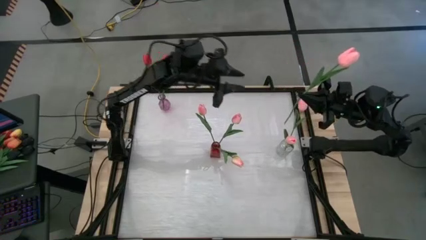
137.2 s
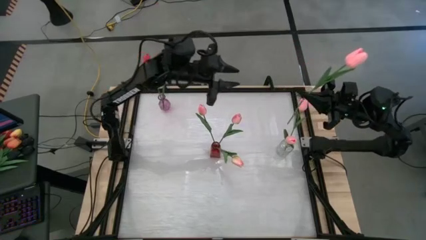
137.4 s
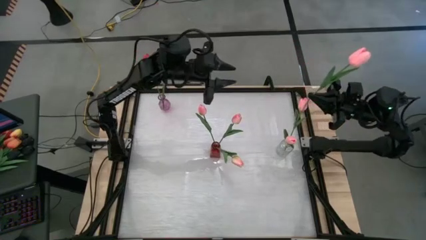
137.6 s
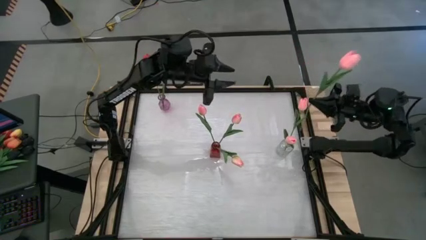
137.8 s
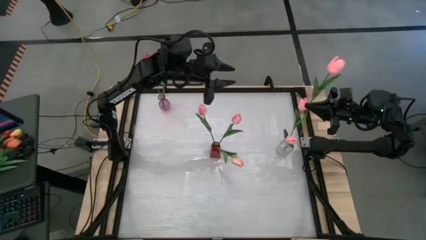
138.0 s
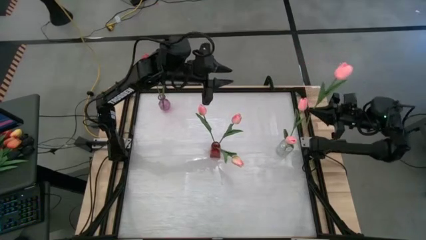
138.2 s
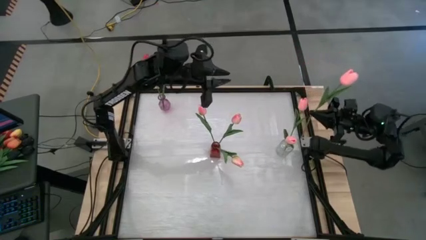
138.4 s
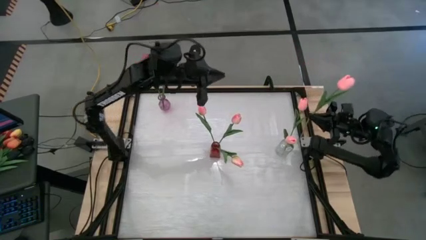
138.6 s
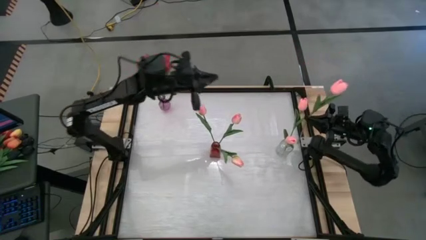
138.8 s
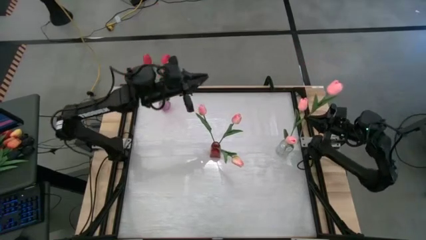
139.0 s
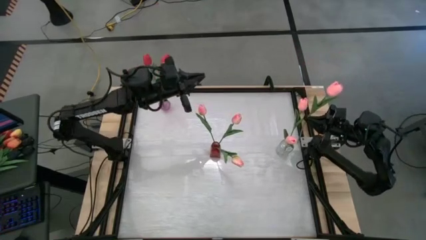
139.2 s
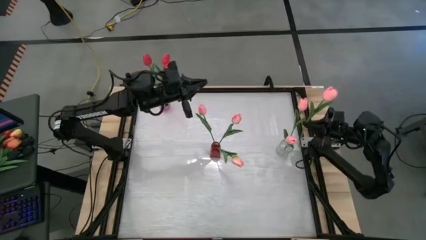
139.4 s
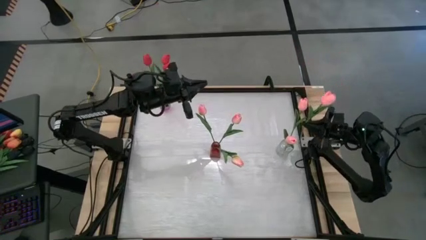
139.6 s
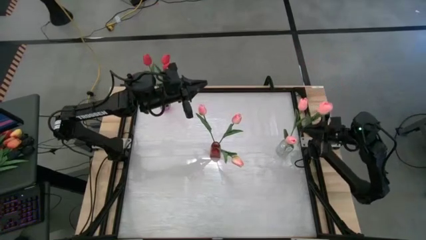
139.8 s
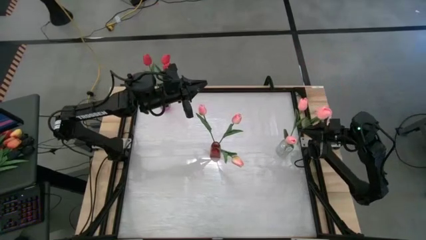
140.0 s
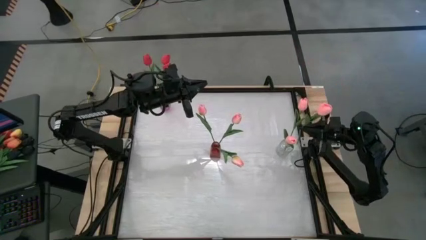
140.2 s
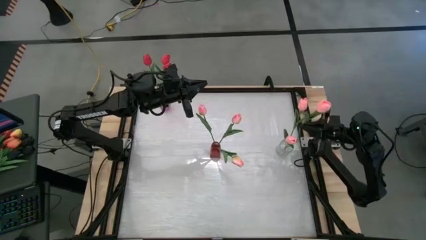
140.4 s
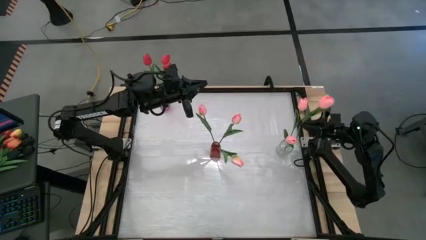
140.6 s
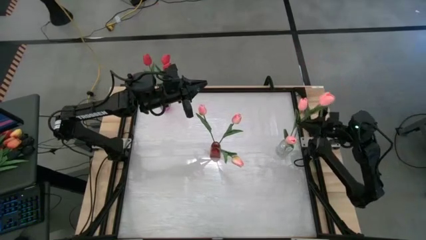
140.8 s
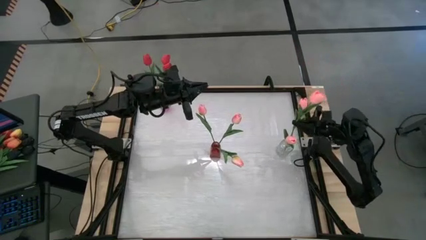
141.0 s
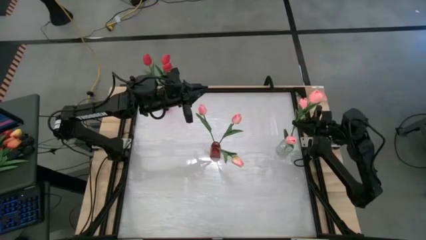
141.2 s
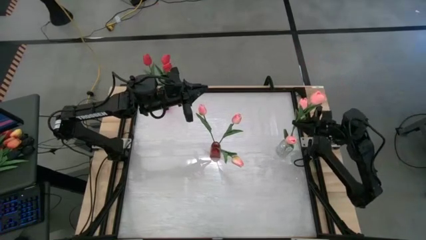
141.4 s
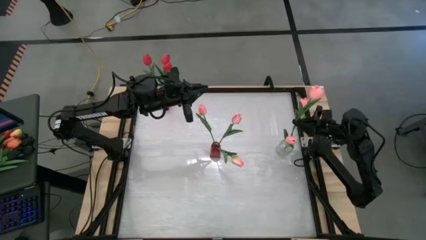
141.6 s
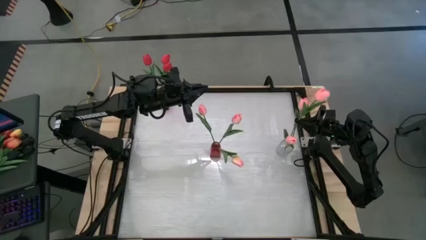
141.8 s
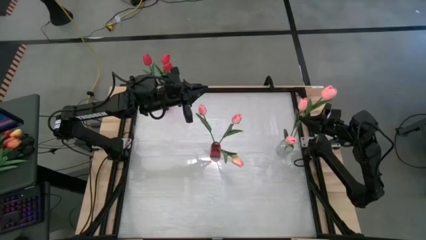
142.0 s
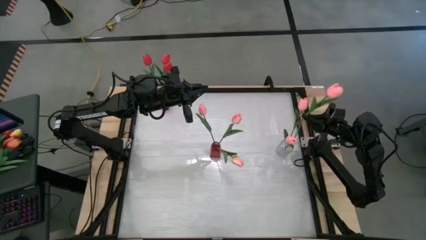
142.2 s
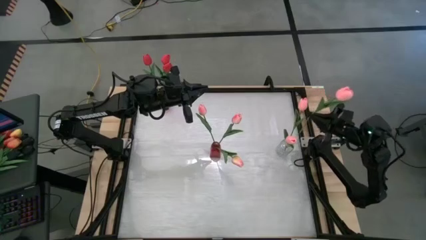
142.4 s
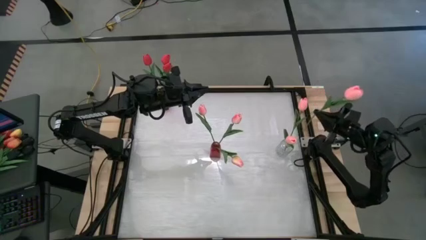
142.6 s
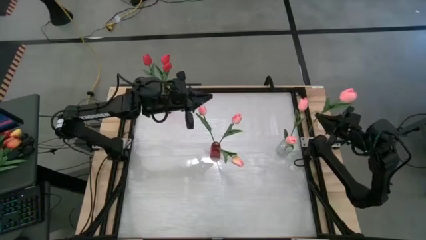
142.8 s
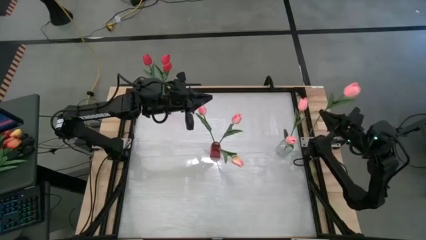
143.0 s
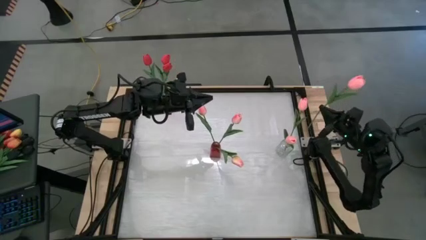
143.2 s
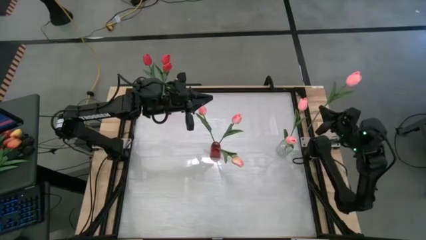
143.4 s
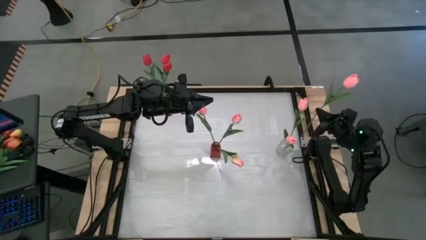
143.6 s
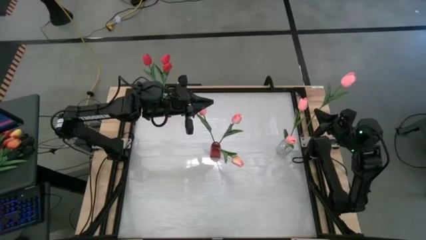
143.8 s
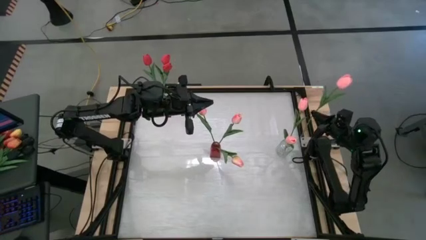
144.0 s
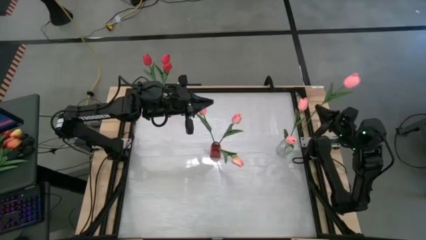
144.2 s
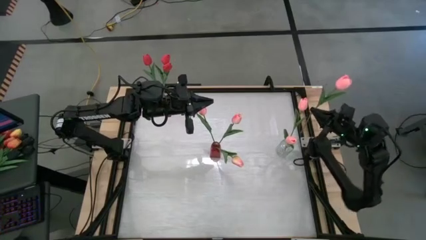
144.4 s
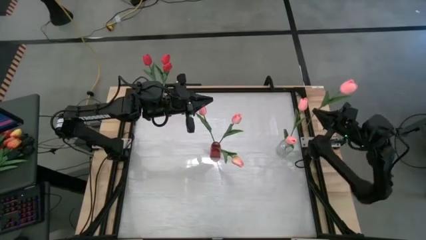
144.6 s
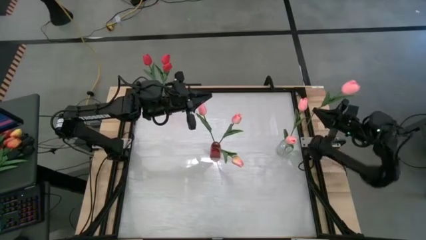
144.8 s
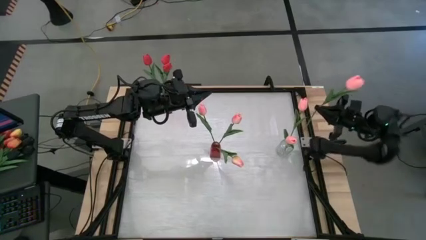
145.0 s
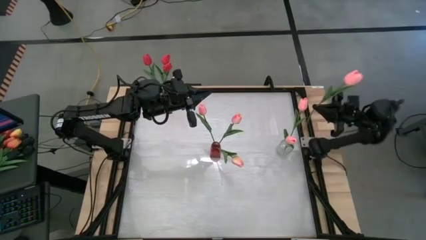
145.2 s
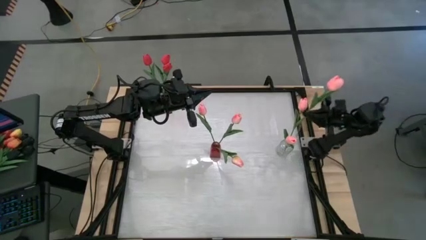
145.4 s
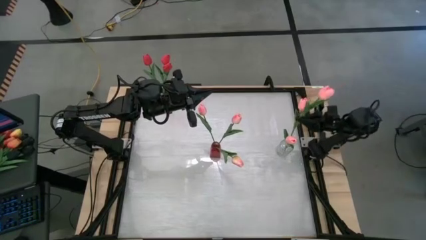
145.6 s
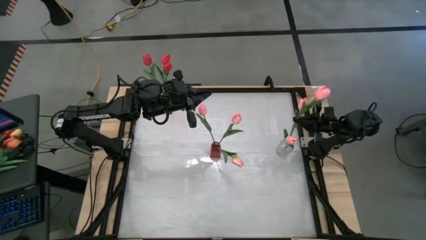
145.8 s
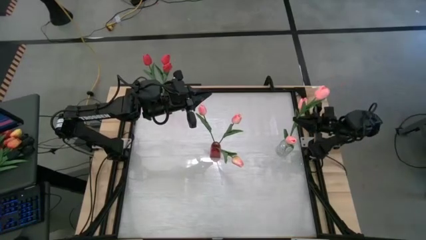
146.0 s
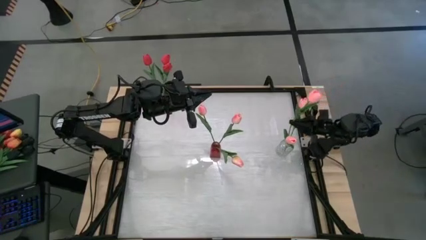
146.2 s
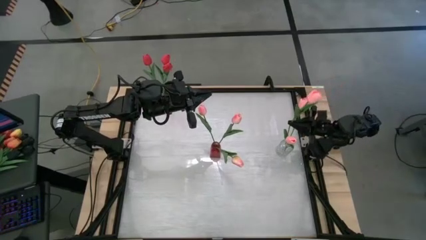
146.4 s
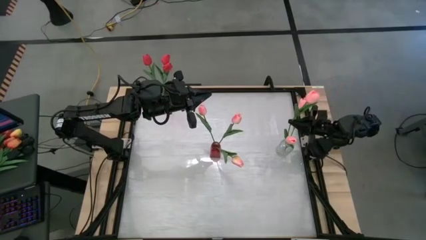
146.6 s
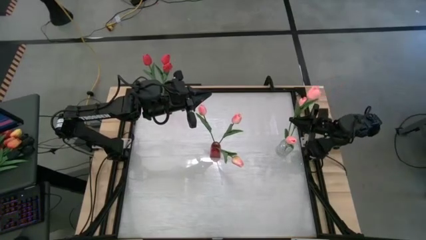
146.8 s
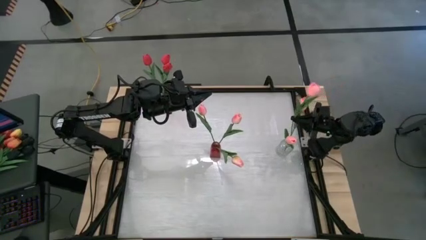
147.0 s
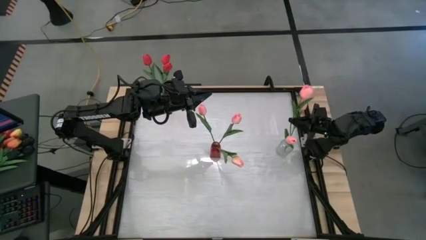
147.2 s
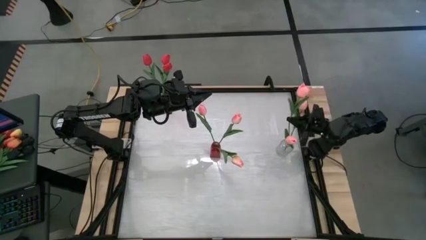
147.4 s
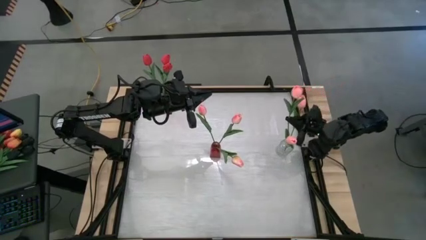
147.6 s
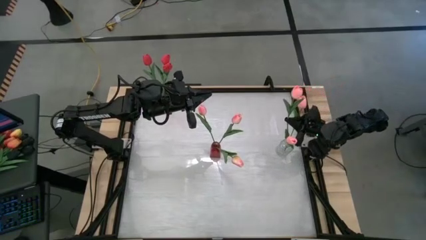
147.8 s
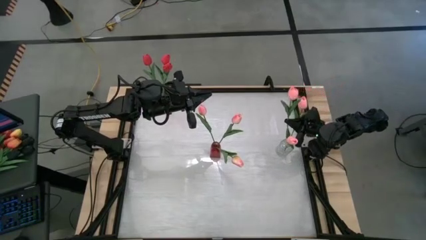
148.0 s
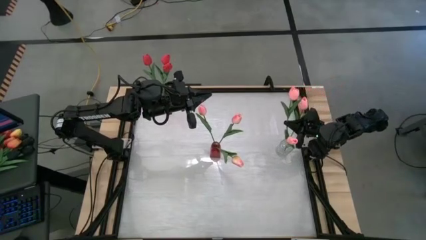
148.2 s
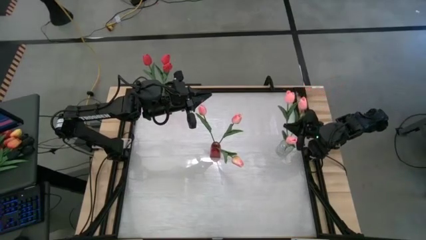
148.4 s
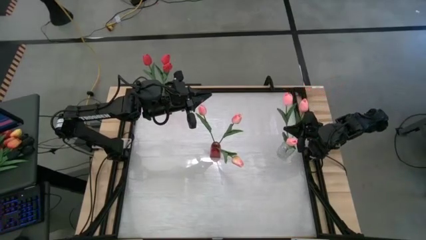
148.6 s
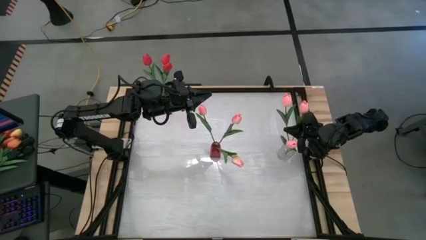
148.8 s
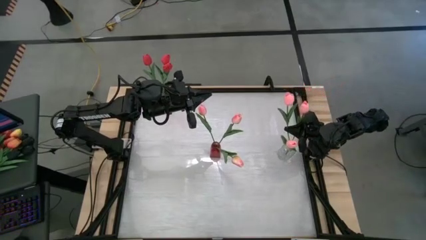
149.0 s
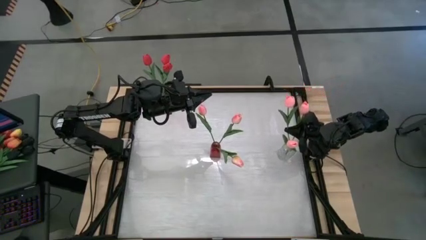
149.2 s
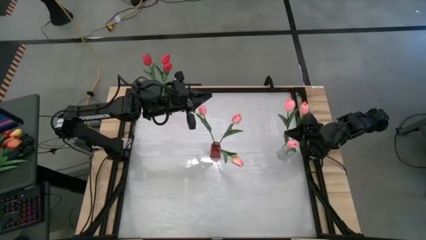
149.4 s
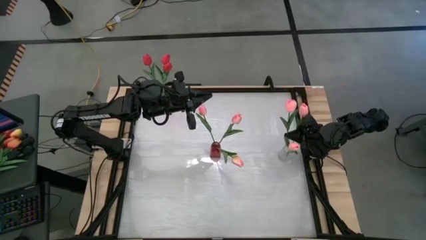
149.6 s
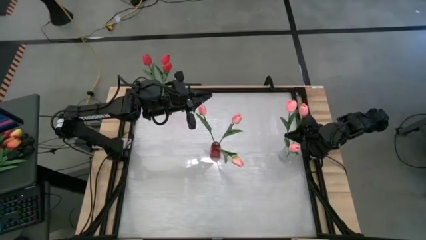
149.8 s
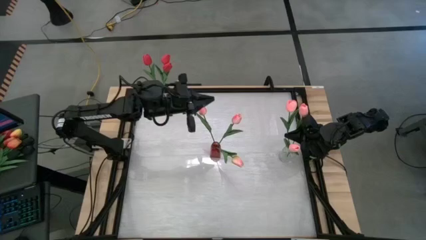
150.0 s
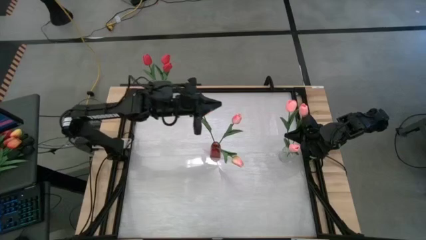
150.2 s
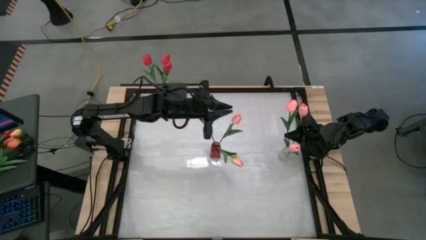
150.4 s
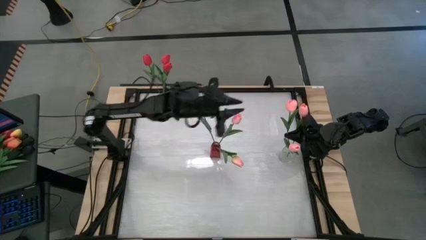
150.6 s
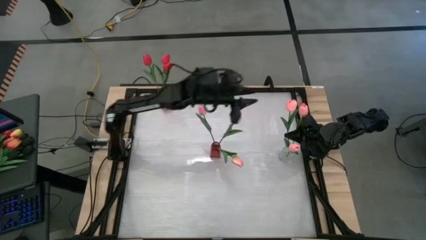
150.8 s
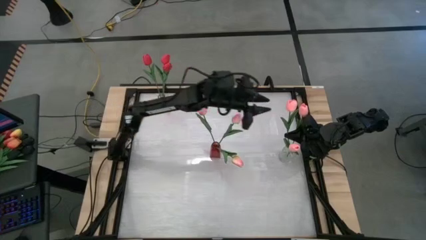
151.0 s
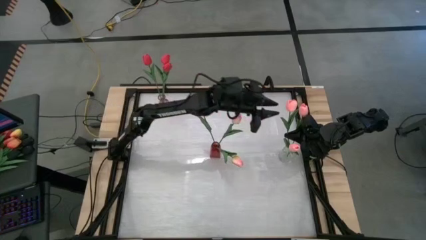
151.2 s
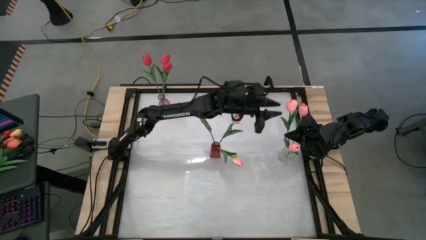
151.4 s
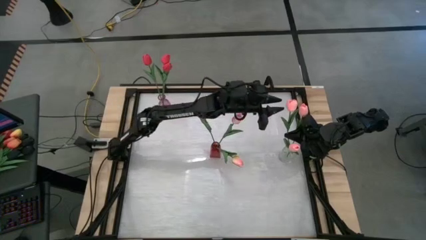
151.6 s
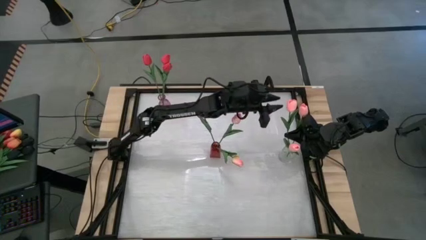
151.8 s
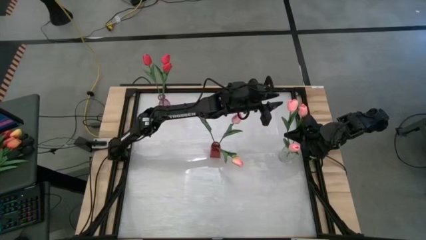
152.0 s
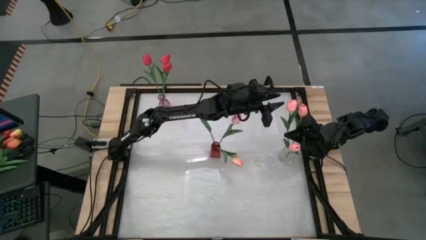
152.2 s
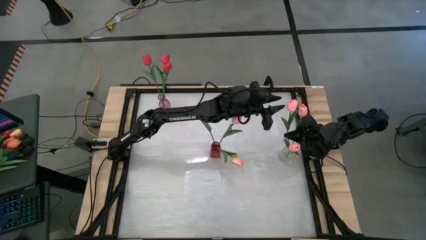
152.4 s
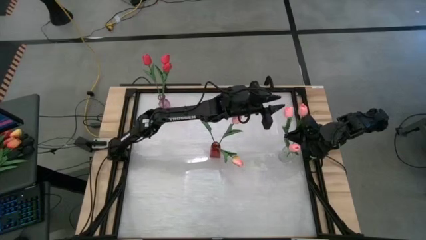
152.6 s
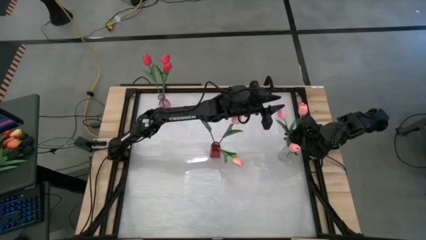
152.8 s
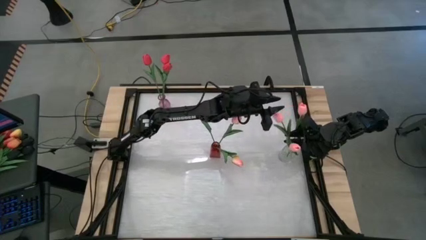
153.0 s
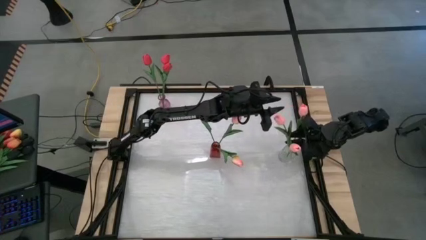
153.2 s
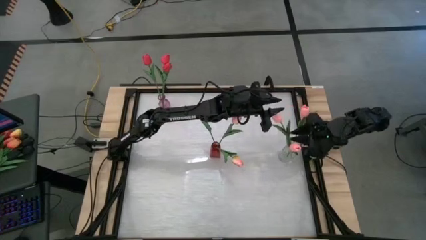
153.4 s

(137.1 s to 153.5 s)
Task: Sort flowers into vase by color
Put the pink tulip into the transparent vase
